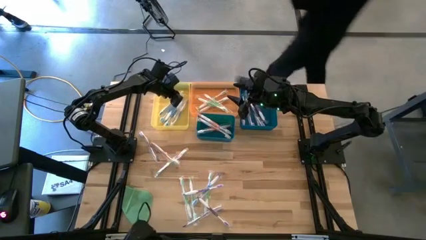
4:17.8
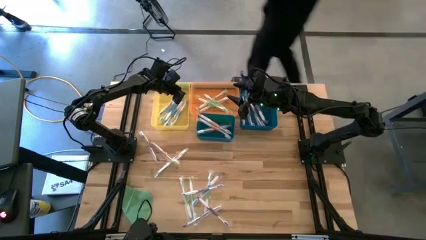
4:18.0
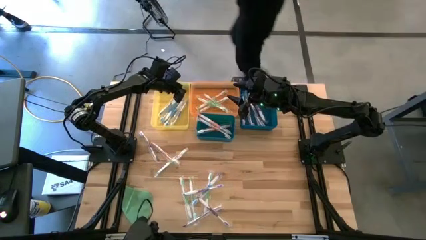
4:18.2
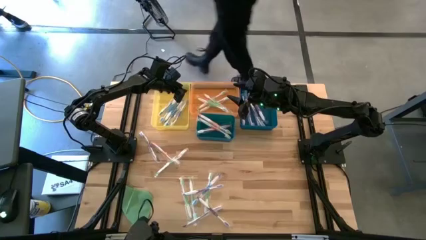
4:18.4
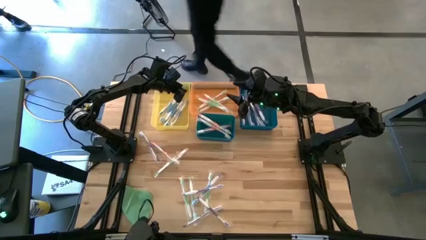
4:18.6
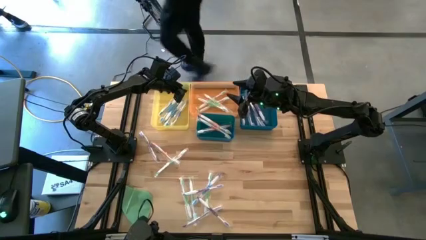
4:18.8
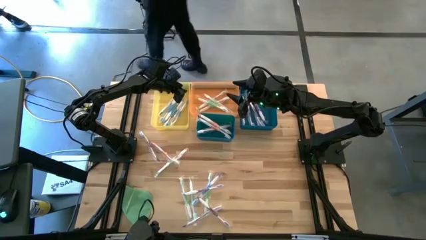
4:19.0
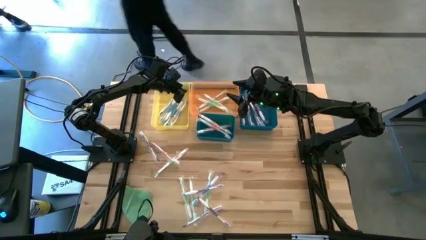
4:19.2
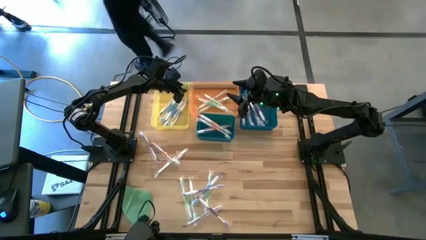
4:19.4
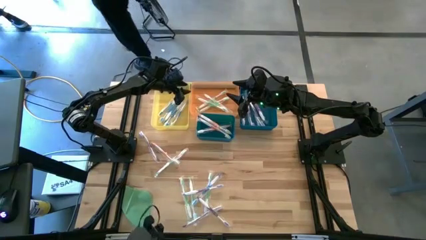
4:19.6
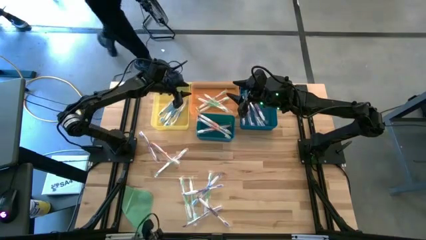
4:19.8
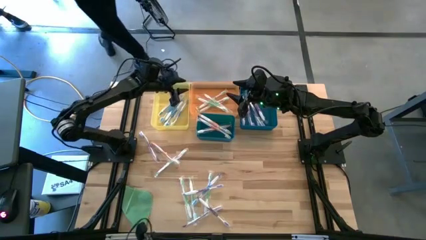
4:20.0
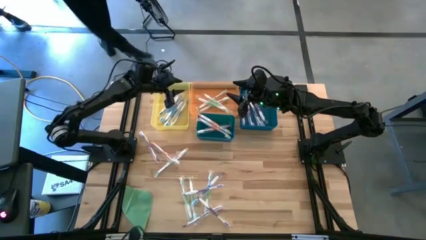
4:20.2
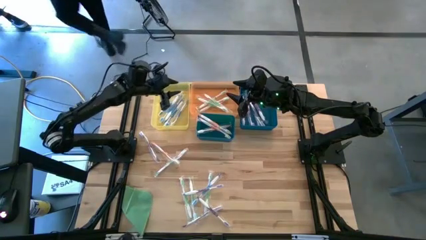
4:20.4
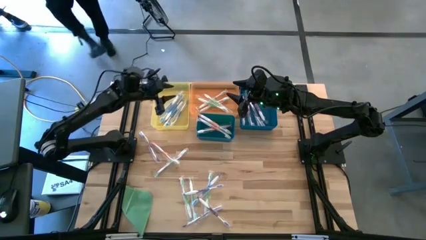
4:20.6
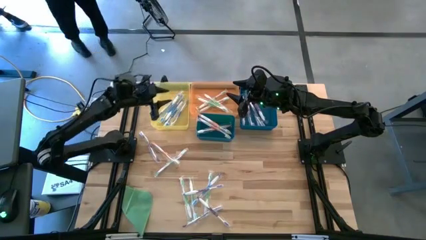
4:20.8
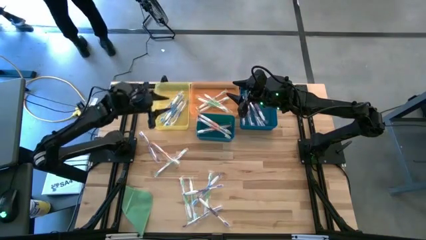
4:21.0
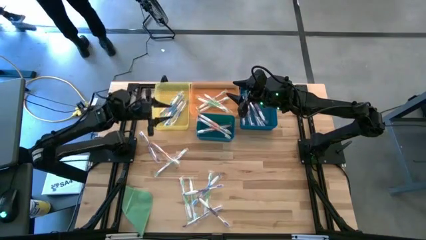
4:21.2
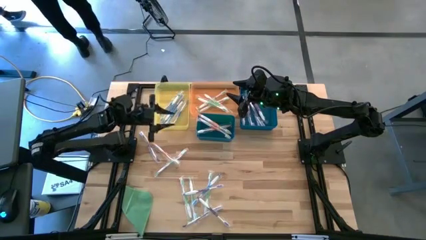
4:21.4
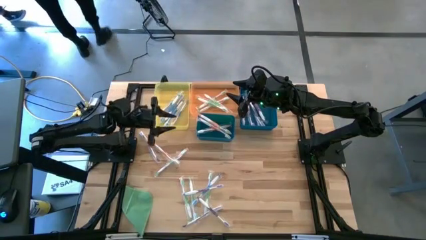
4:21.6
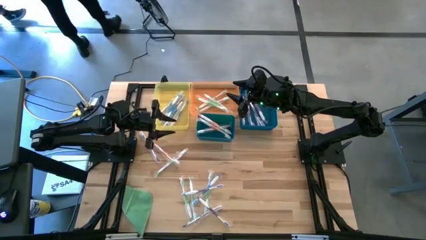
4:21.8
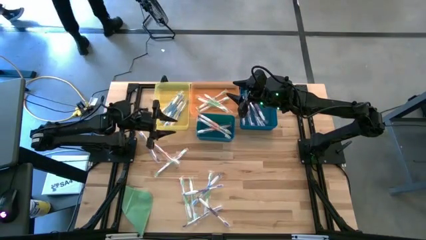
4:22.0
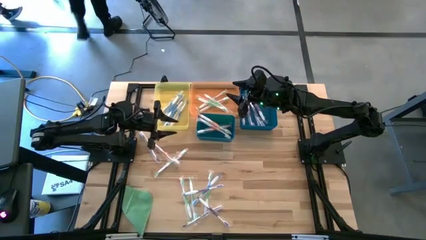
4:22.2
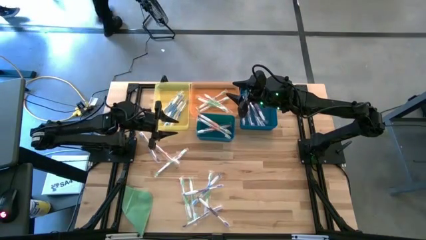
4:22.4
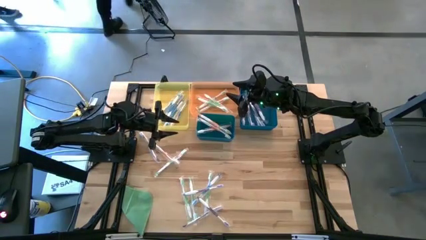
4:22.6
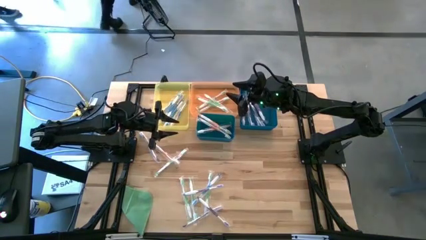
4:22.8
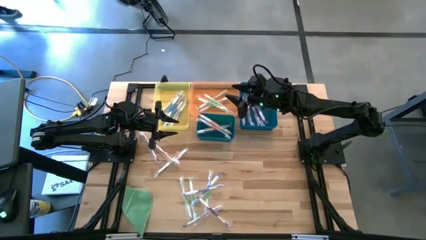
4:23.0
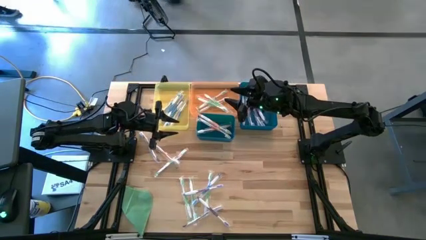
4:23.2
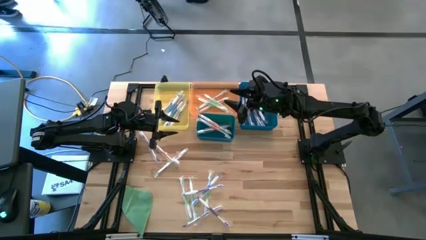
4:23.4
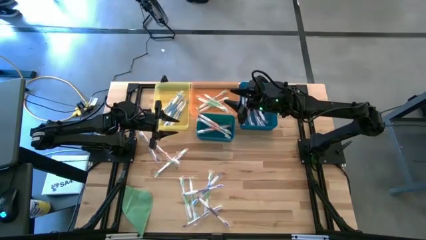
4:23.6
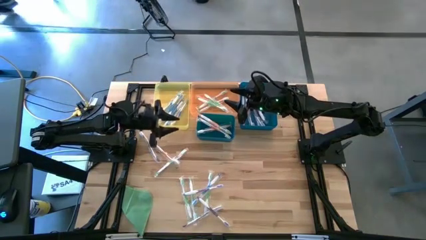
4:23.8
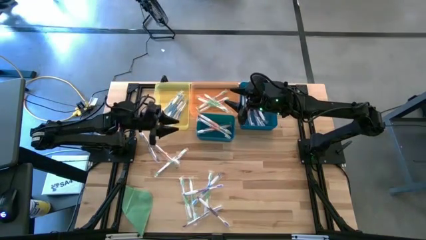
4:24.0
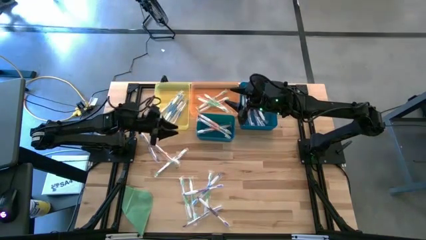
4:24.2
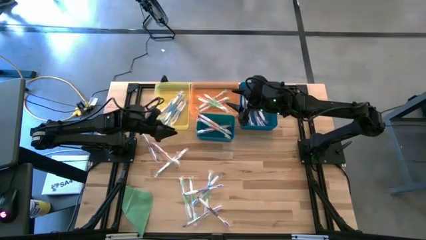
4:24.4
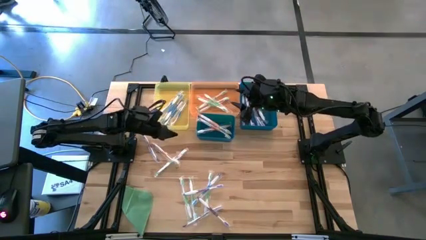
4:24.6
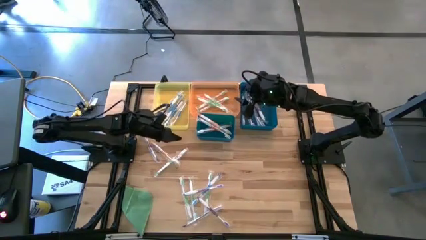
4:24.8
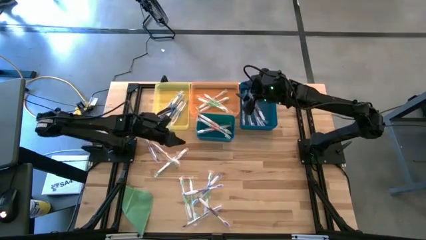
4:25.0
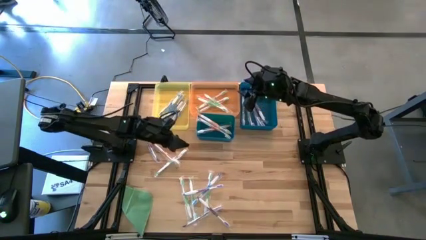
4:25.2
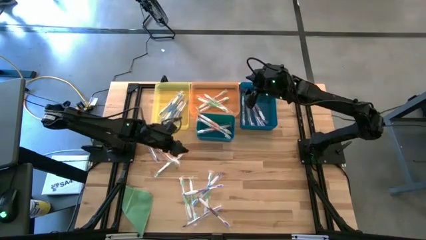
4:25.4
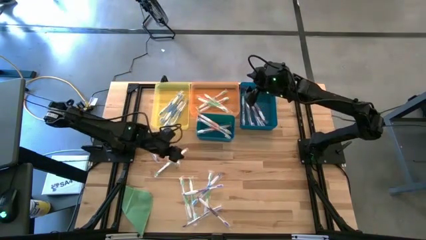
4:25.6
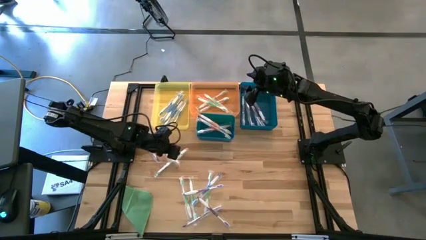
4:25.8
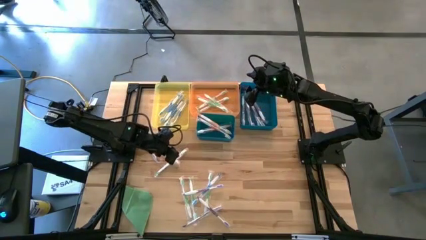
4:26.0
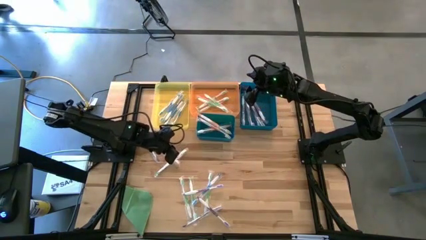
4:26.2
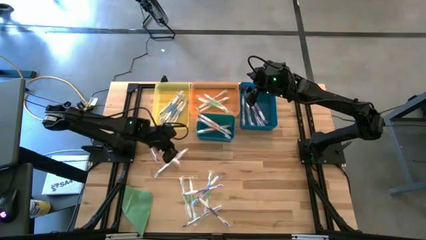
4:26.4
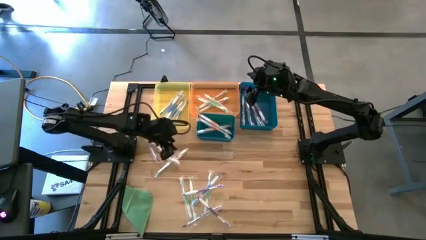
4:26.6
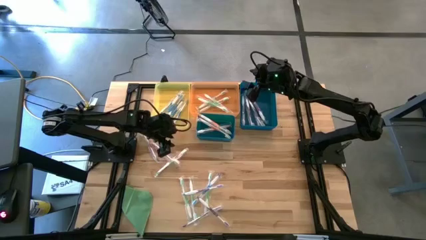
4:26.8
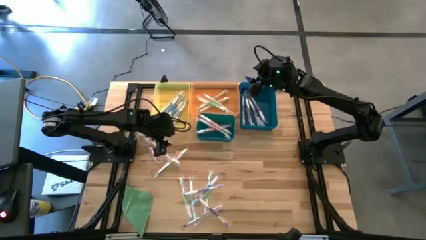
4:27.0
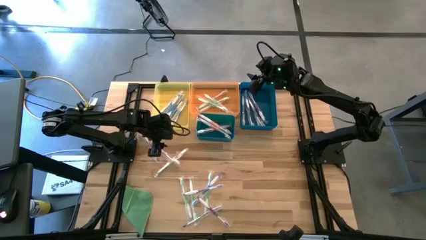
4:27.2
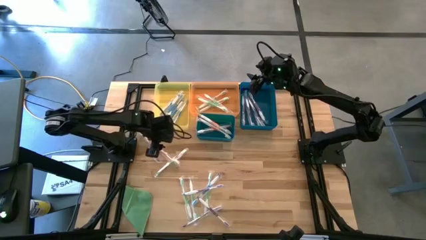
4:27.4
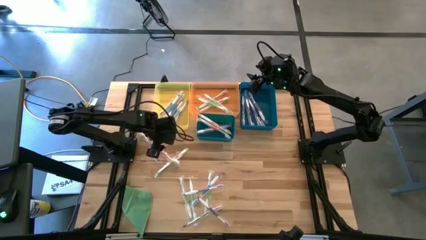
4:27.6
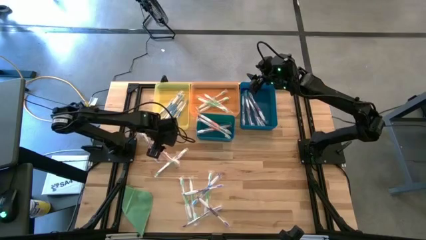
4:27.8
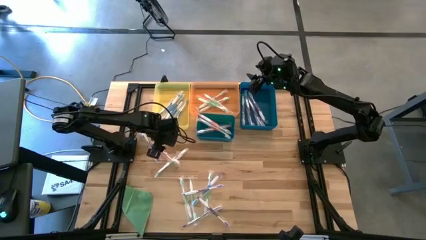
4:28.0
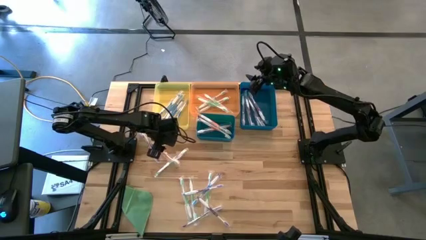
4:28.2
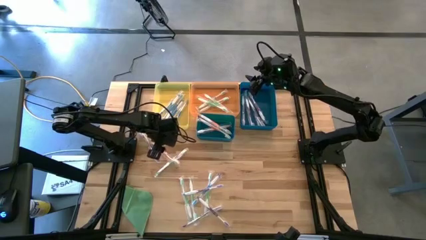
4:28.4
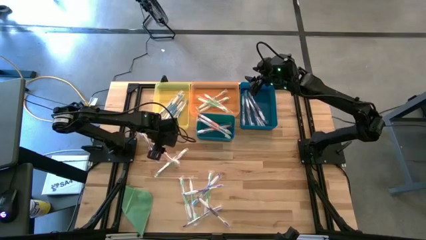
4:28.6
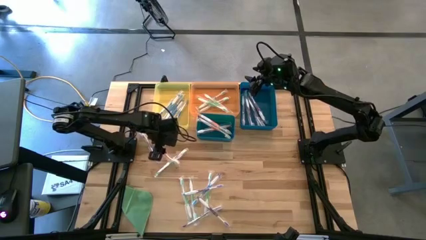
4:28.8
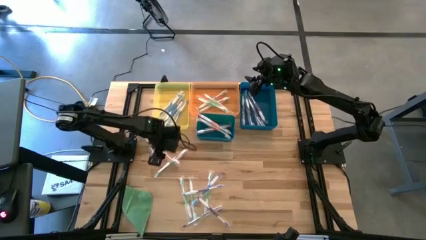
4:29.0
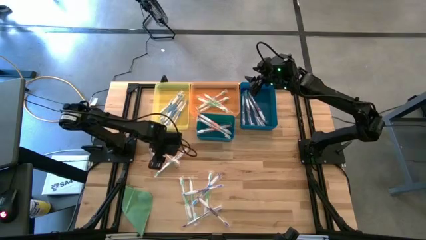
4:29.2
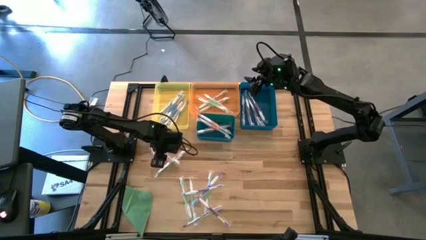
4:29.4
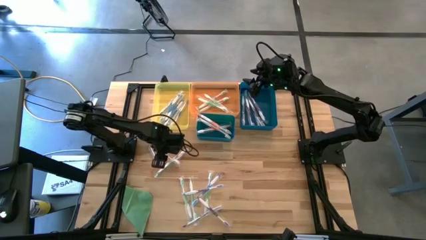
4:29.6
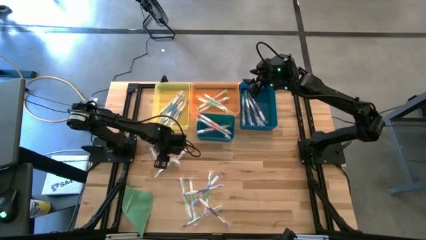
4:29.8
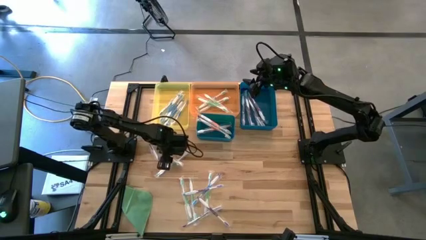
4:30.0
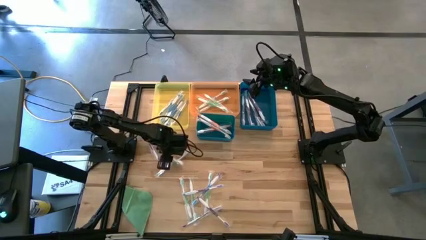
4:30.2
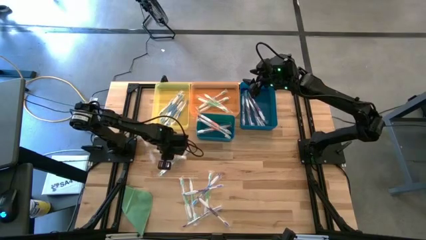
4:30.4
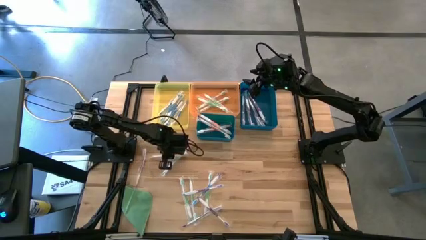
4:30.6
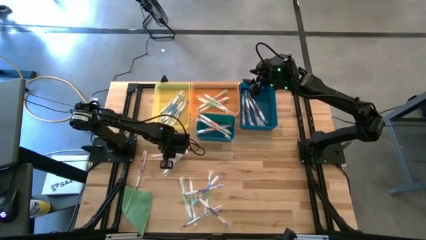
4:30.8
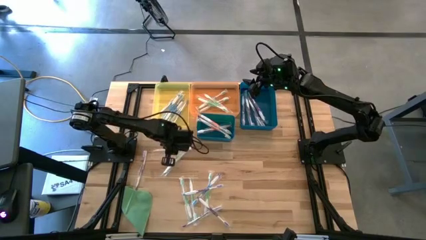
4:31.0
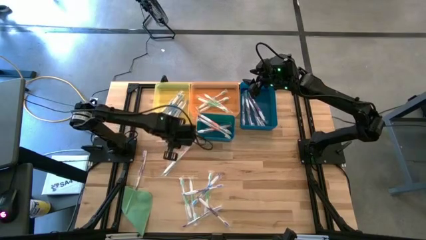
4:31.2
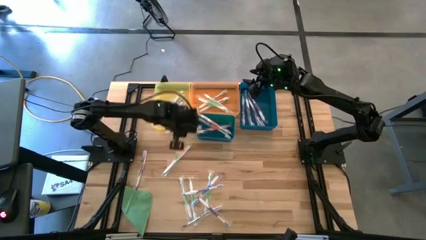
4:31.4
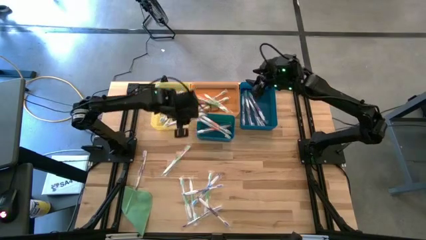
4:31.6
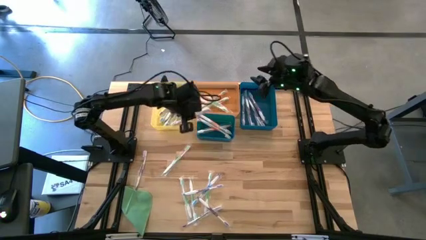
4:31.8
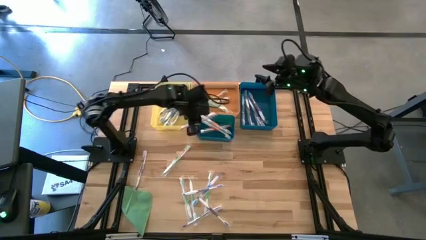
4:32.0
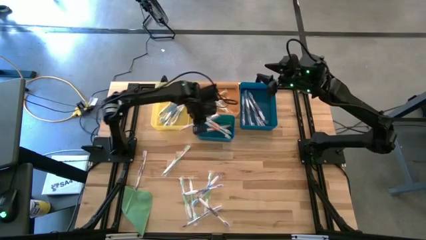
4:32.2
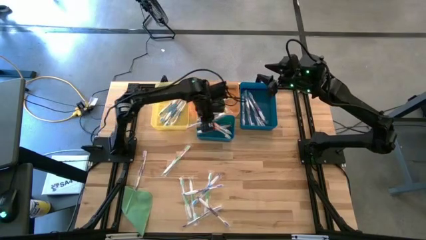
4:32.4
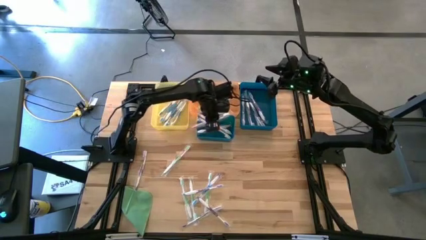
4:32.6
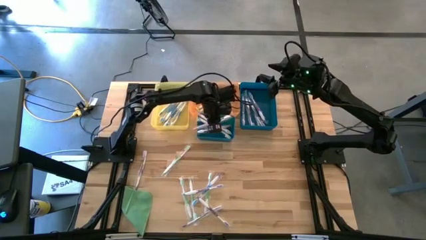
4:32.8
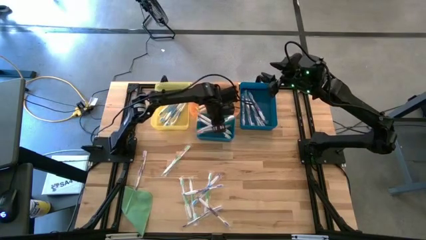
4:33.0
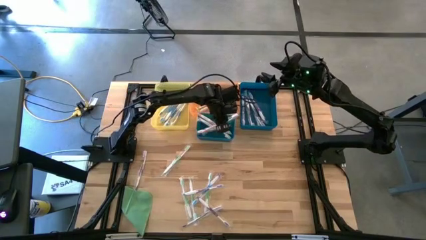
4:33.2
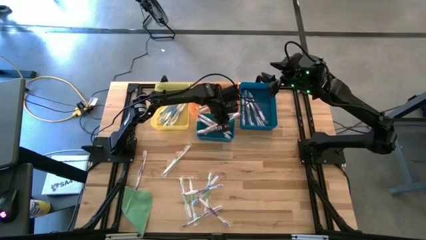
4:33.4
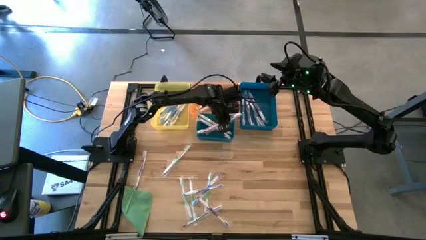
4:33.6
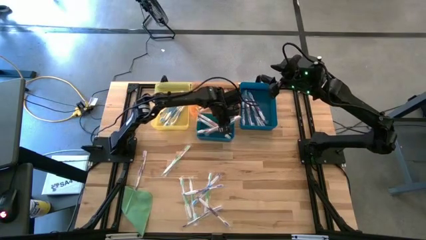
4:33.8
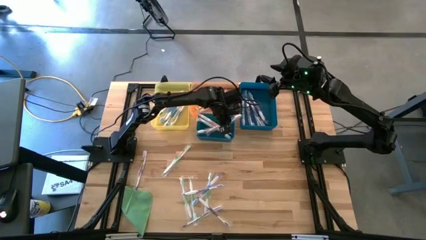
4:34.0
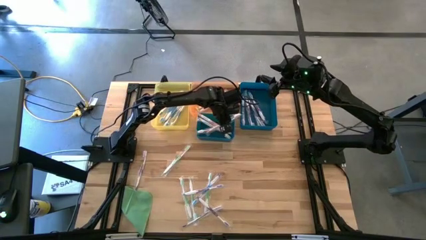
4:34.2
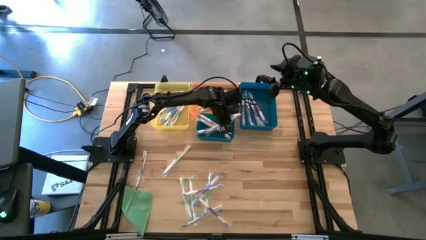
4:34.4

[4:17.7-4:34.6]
Task: Pick & Place Toothbrushes
Put the orange toothbrush into the dark green bin
